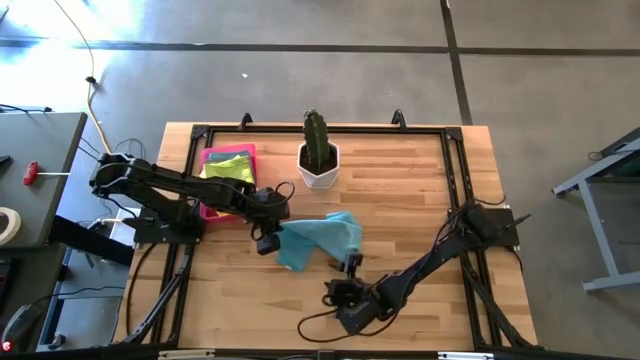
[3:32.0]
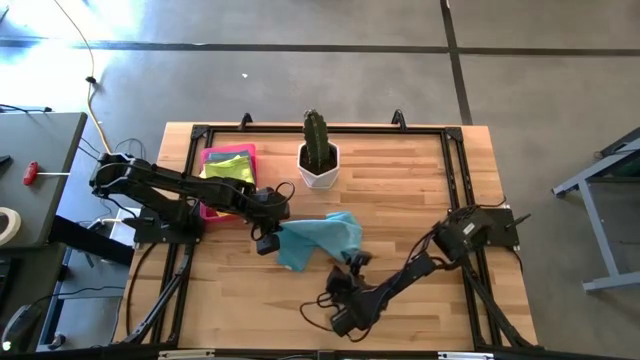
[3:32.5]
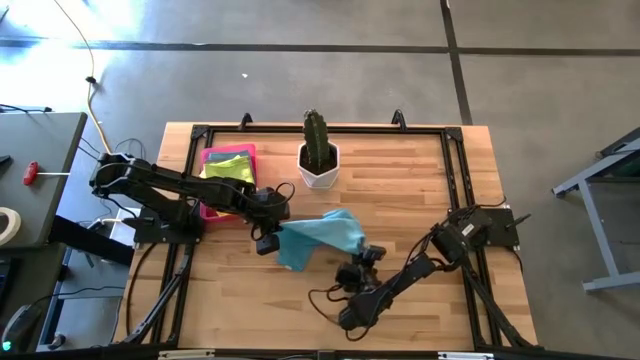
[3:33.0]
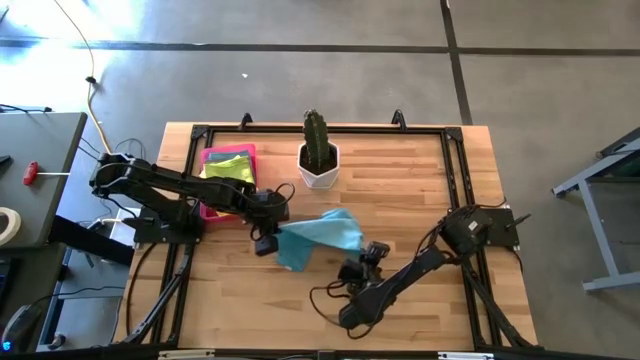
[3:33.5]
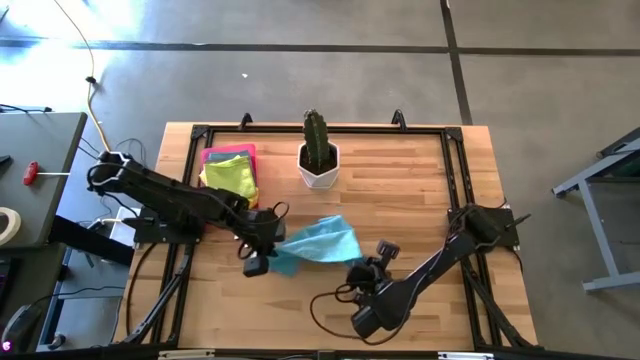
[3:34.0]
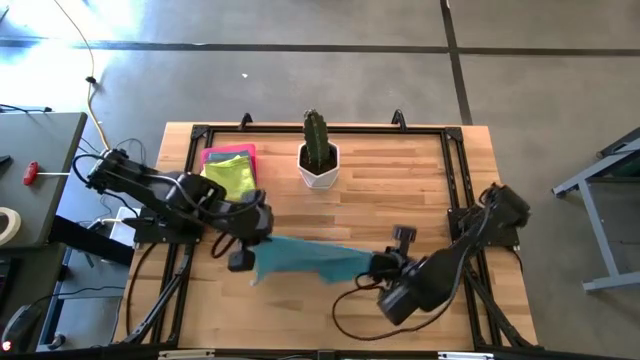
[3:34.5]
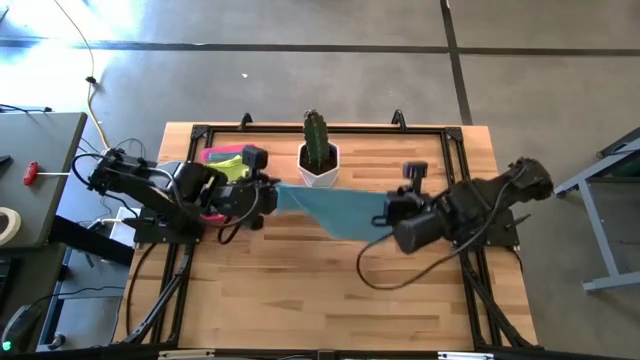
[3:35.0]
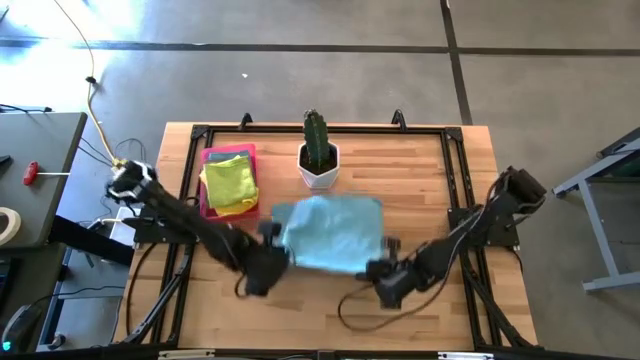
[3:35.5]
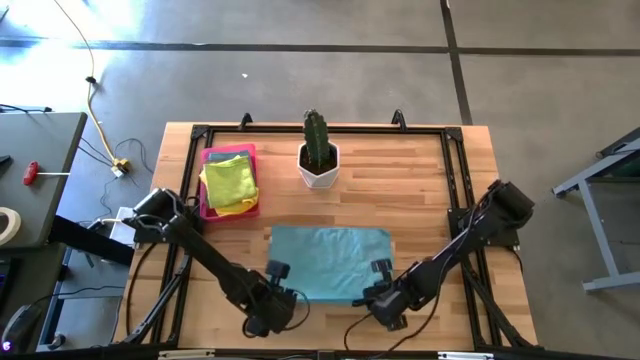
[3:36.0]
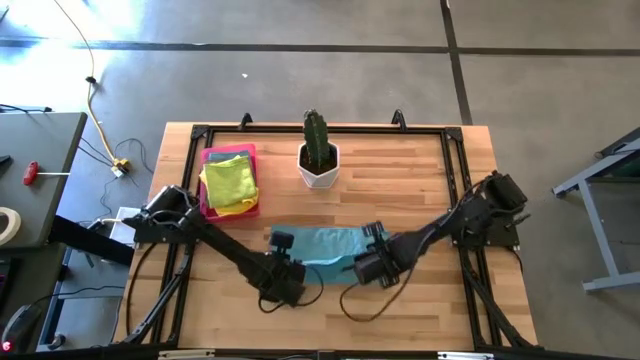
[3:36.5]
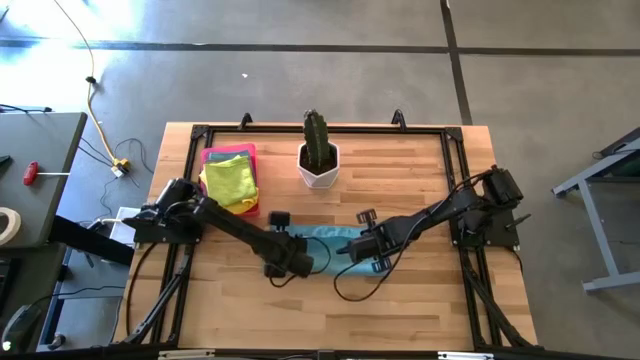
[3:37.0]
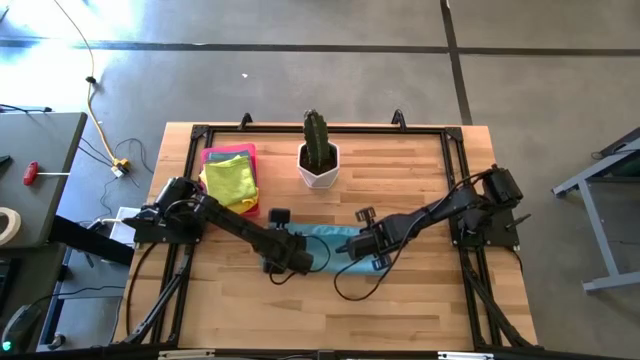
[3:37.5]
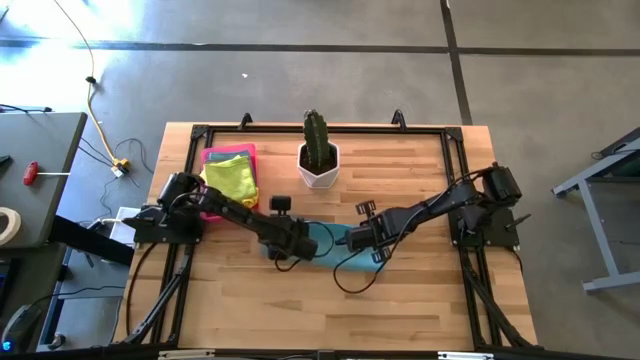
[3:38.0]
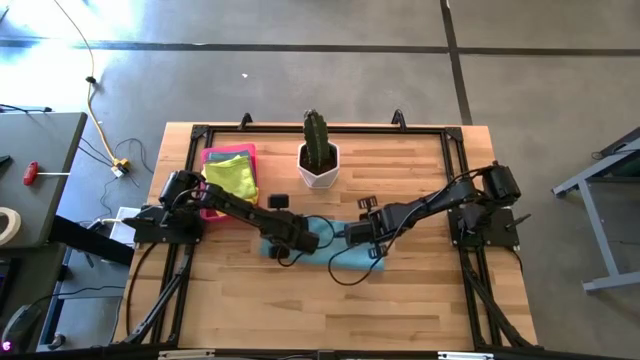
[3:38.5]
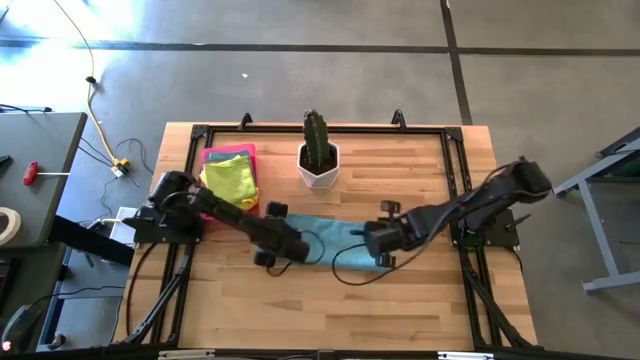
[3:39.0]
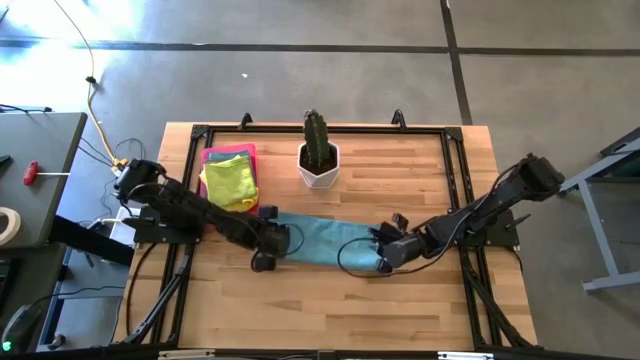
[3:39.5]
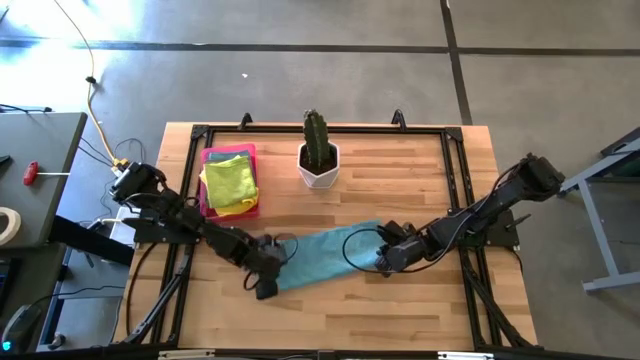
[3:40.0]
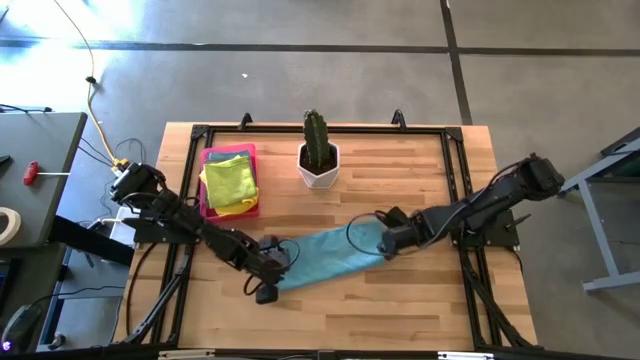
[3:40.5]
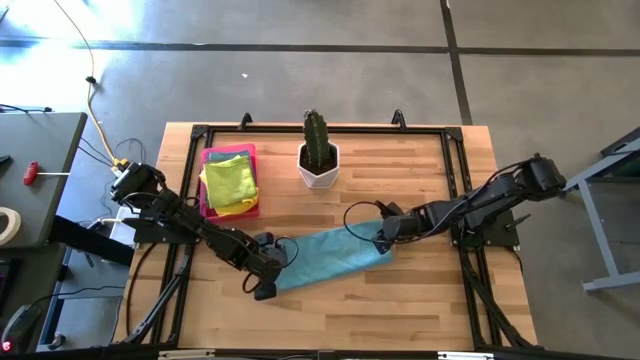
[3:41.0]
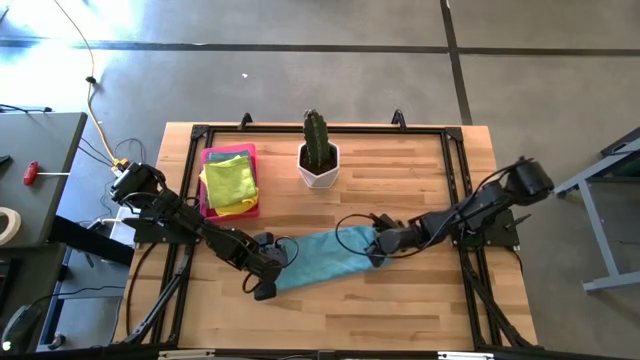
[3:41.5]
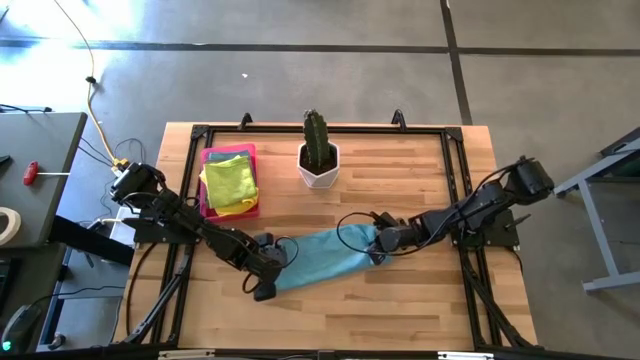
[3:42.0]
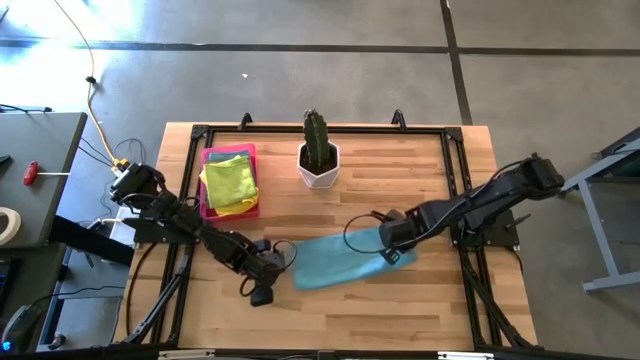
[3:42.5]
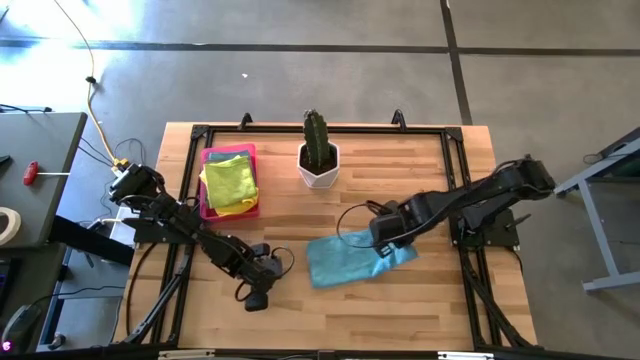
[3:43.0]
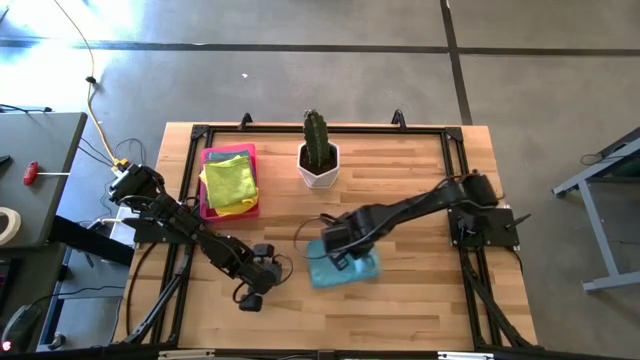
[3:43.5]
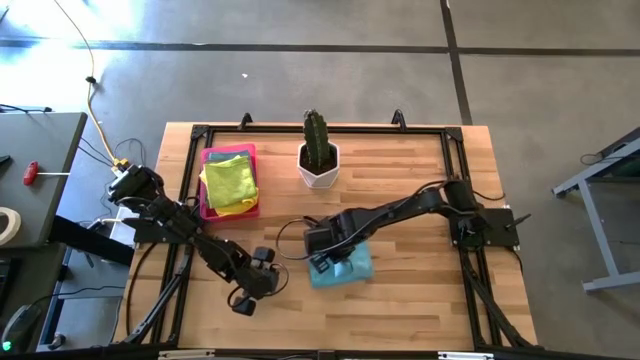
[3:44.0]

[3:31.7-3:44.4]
Task: Fold microfiber towels
Fold the blue towel

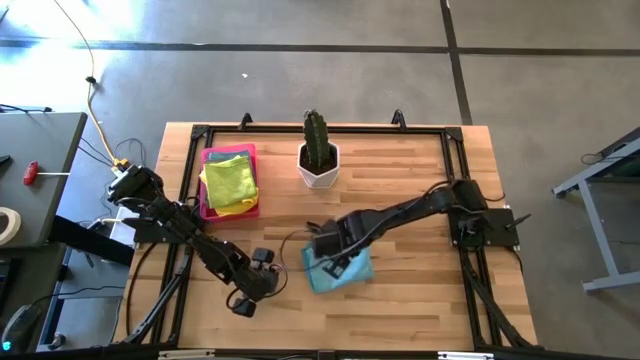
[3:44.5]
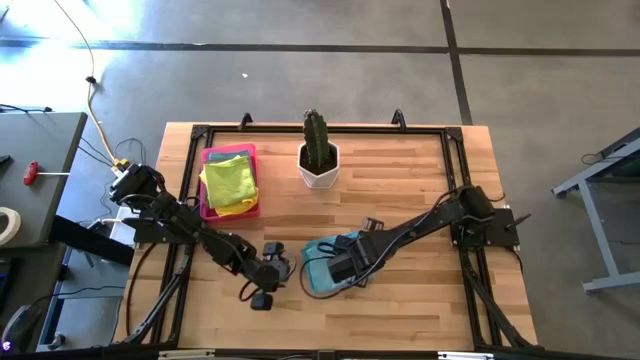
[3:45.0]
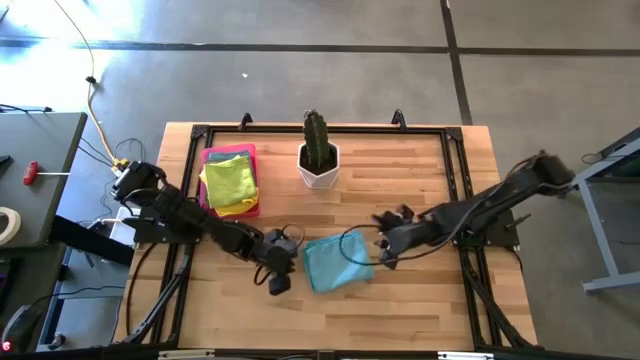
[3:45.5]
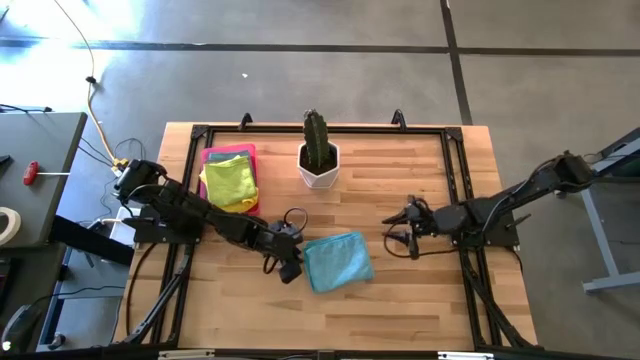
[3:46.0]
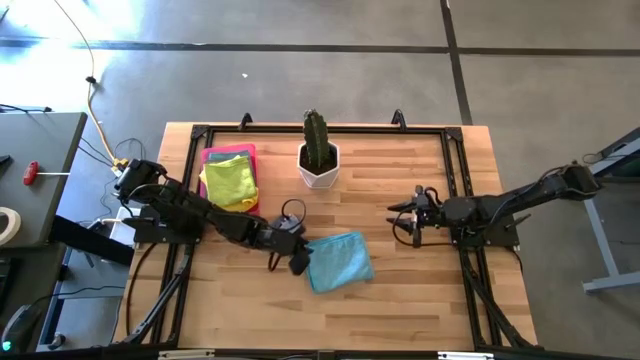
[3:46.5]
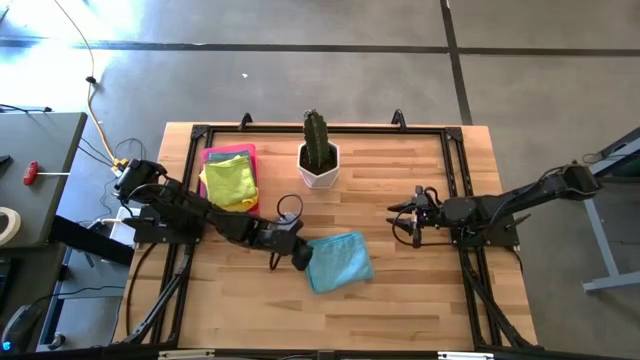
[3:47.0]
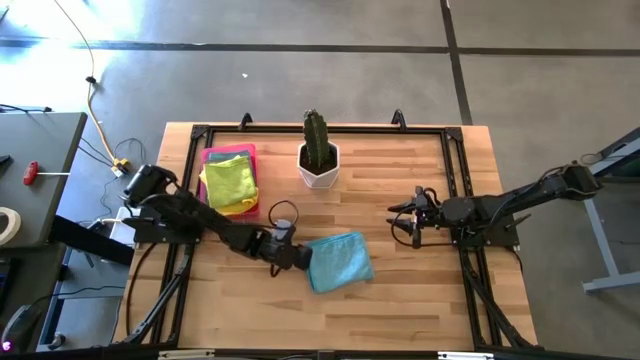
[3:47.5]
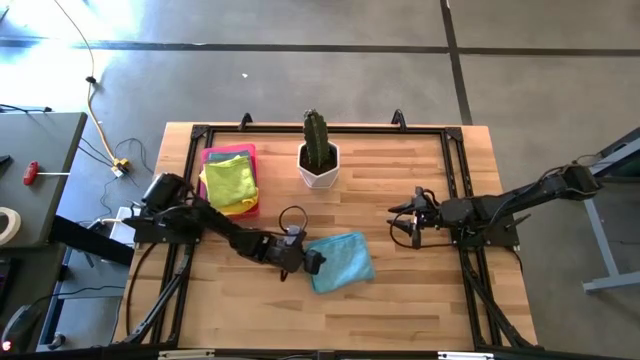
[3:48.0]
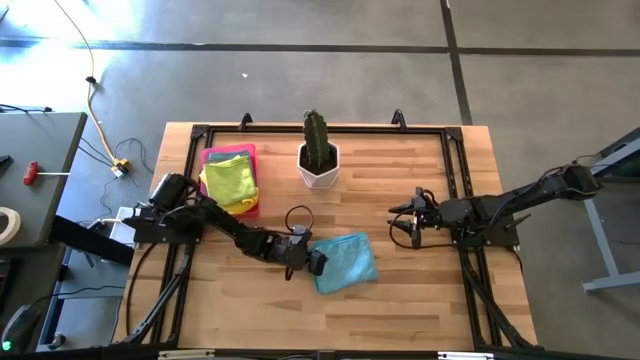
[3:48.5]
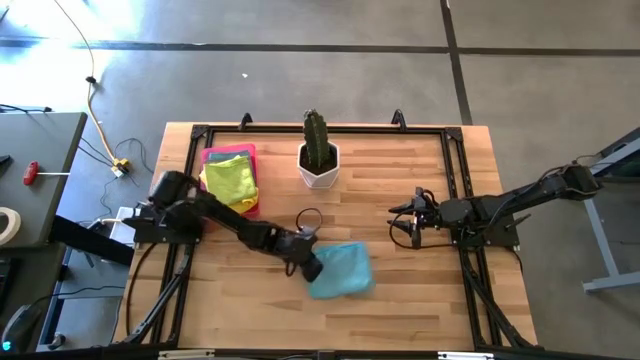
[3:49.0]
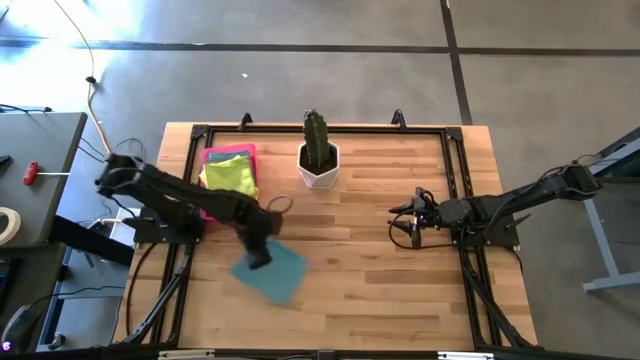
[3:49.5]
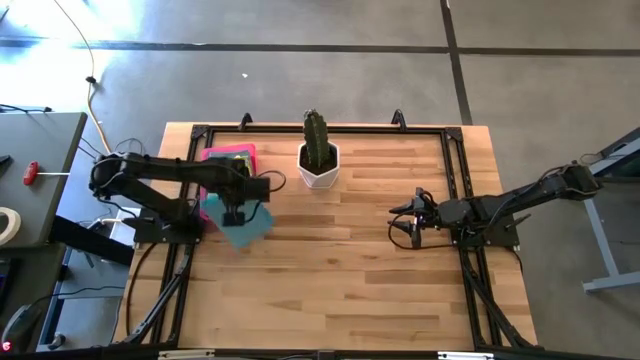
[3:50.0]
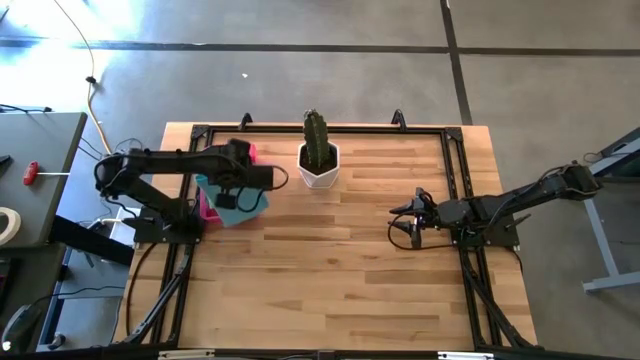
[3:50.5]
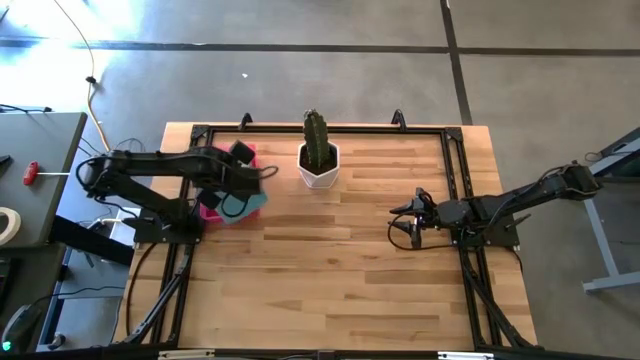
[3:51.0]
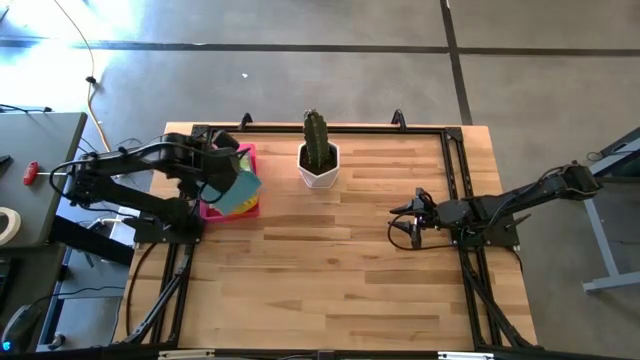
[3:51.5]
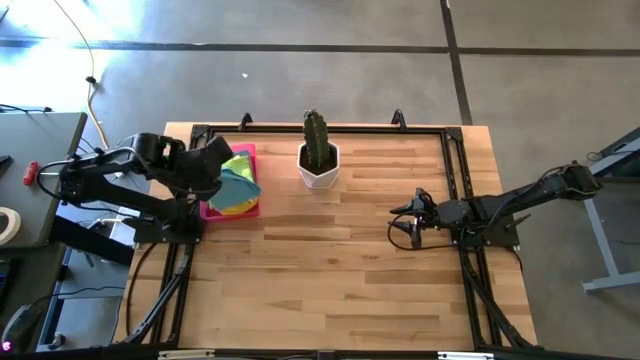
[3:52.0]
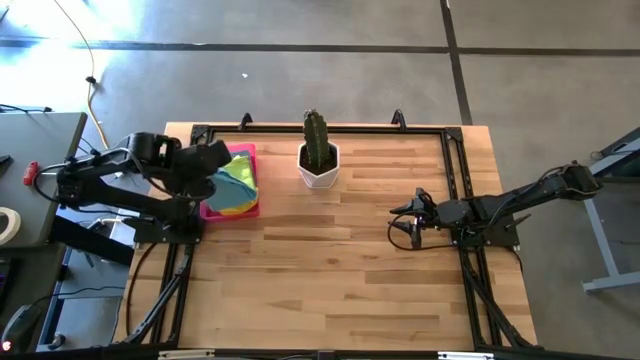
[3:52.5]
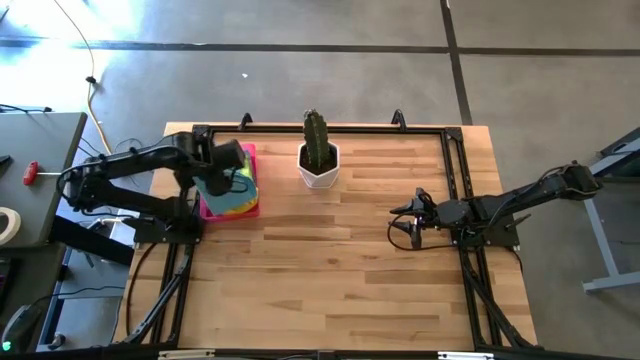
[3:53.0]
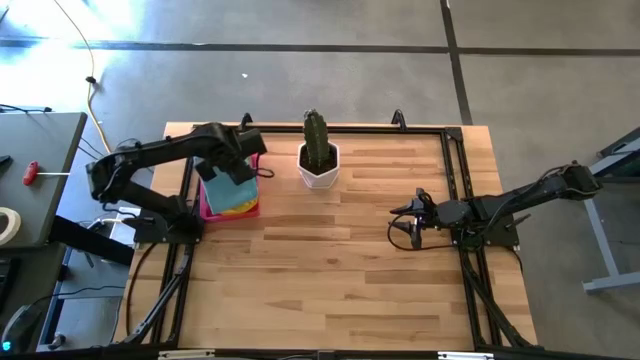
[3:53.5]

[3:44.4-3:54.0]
Put the blue towel in the pink bin
